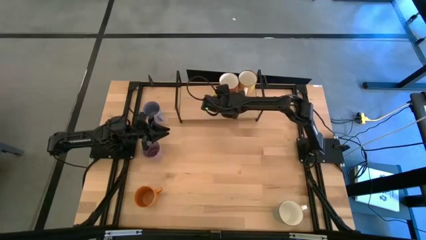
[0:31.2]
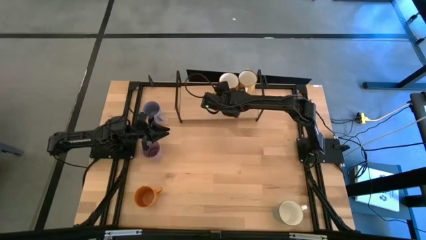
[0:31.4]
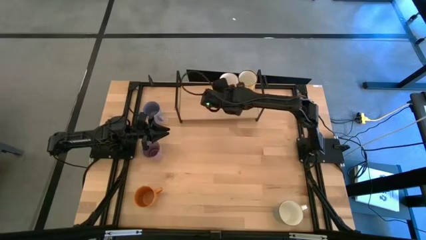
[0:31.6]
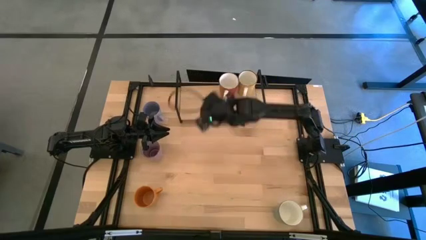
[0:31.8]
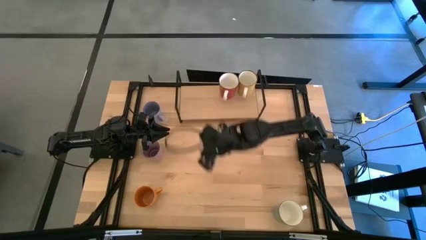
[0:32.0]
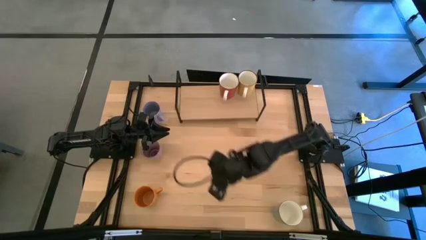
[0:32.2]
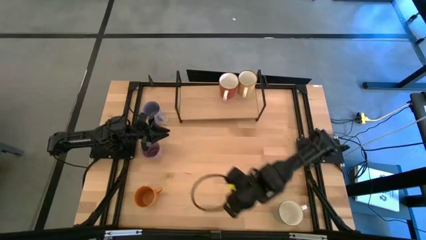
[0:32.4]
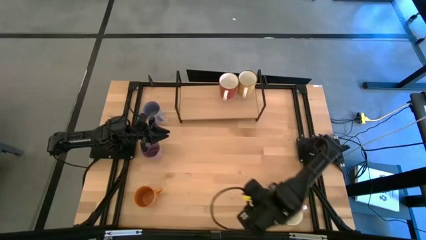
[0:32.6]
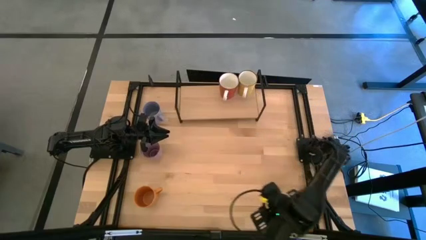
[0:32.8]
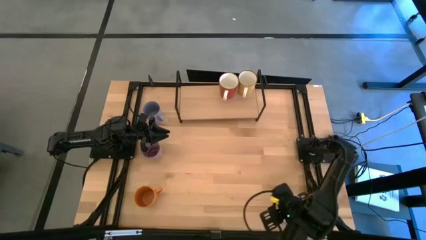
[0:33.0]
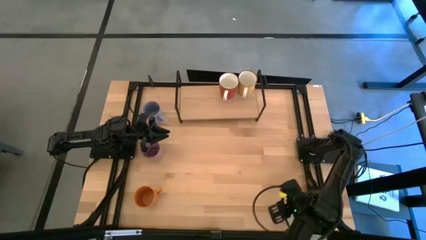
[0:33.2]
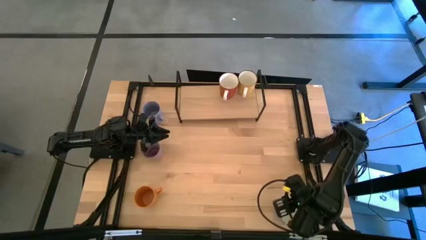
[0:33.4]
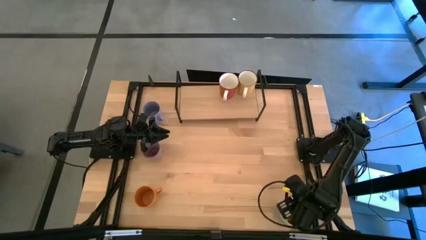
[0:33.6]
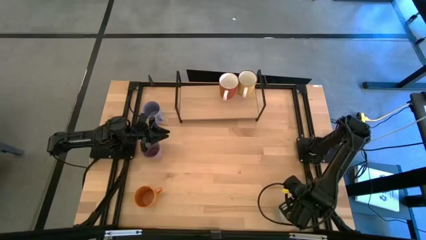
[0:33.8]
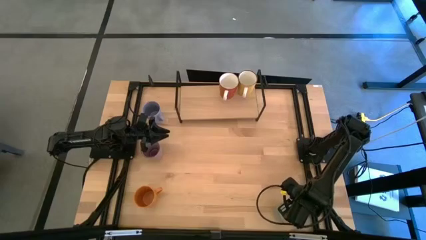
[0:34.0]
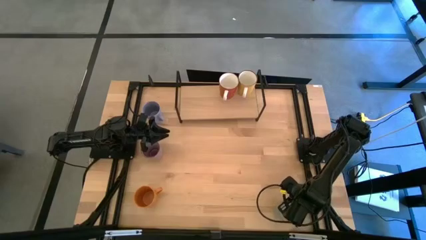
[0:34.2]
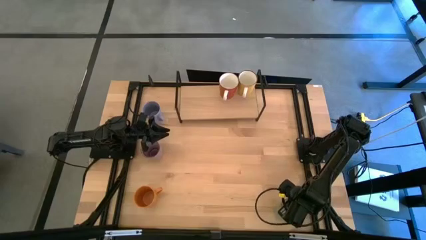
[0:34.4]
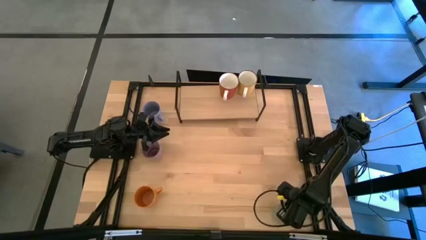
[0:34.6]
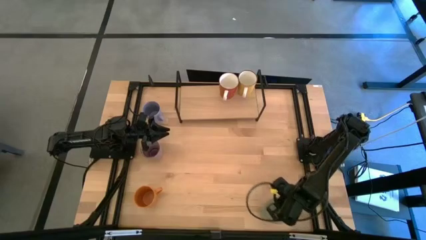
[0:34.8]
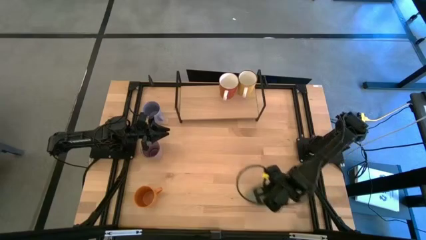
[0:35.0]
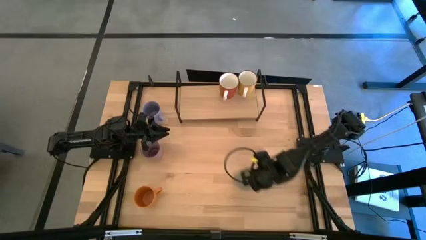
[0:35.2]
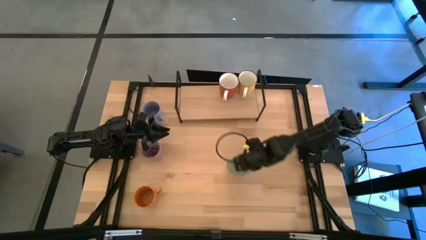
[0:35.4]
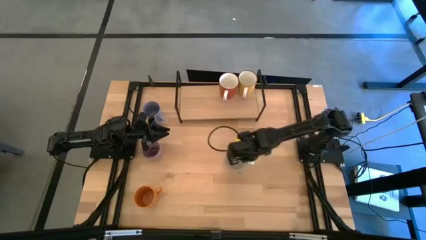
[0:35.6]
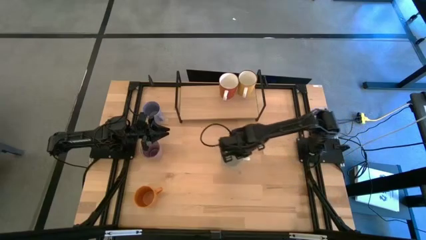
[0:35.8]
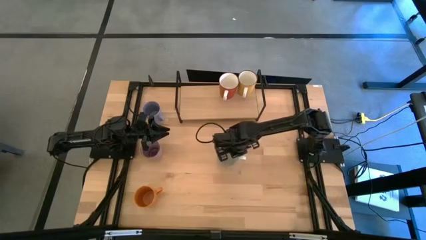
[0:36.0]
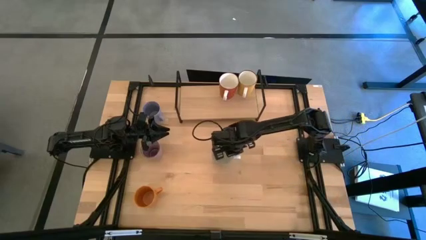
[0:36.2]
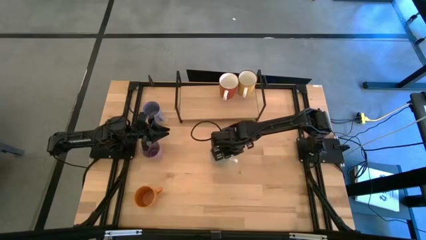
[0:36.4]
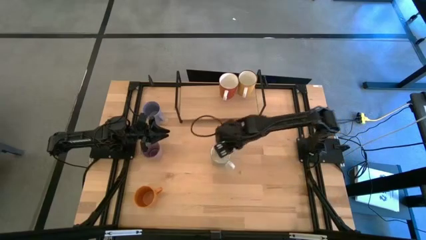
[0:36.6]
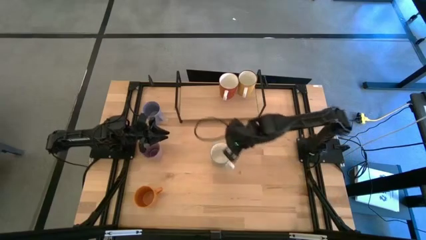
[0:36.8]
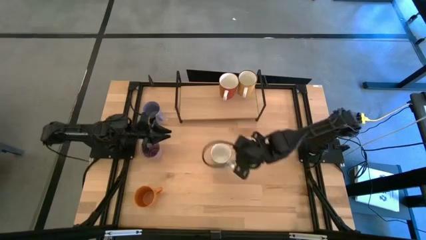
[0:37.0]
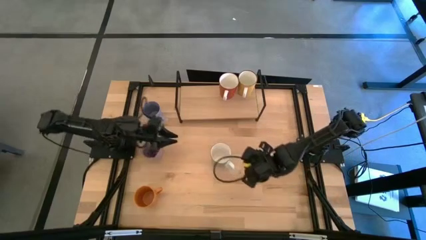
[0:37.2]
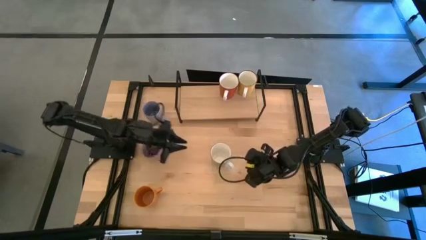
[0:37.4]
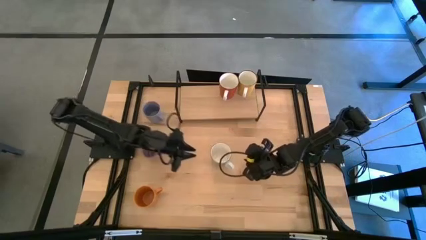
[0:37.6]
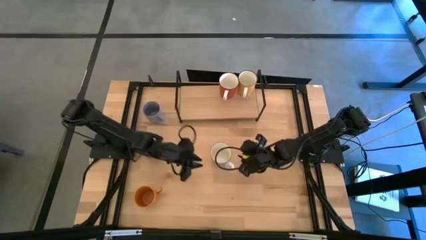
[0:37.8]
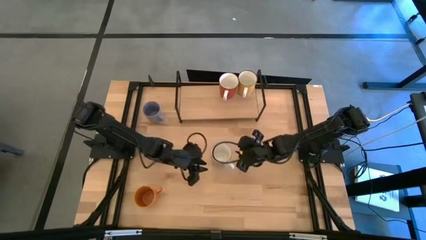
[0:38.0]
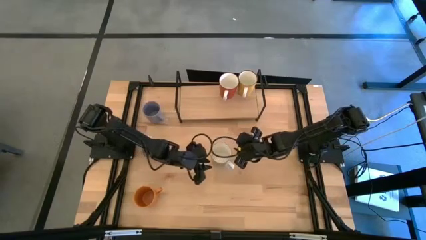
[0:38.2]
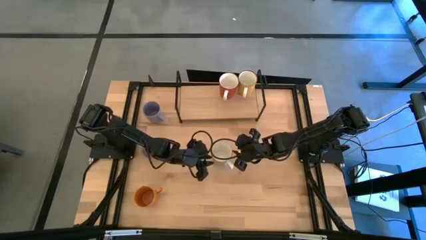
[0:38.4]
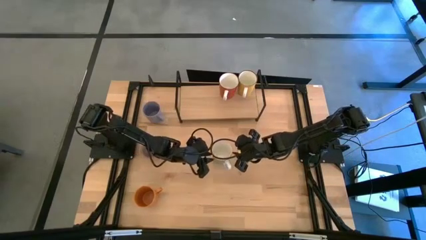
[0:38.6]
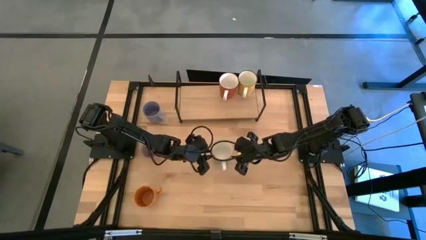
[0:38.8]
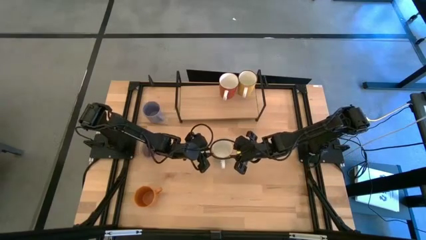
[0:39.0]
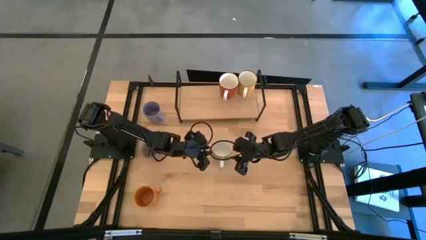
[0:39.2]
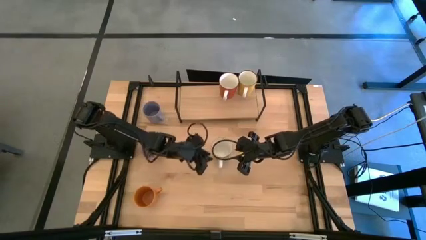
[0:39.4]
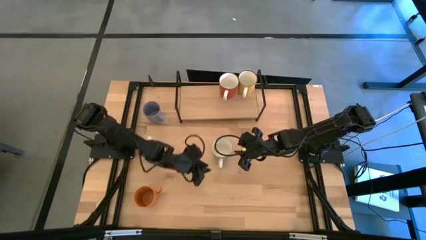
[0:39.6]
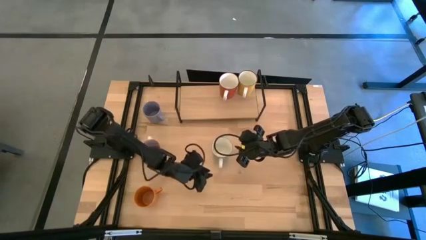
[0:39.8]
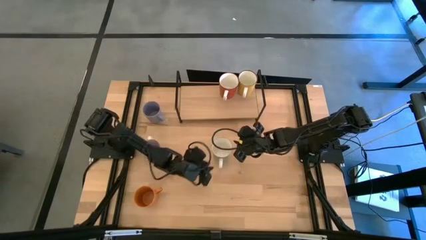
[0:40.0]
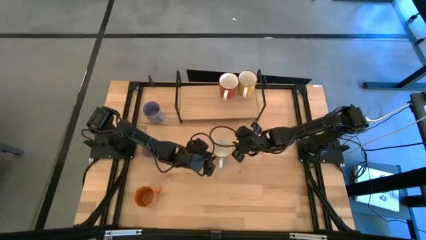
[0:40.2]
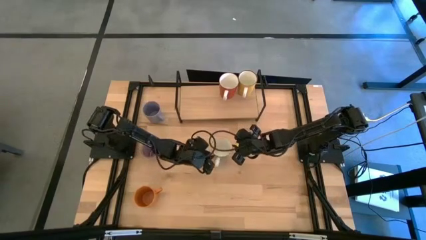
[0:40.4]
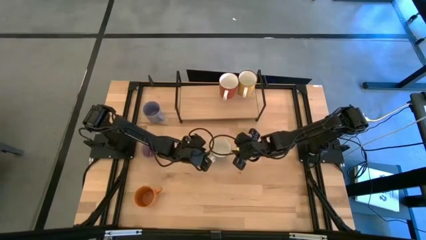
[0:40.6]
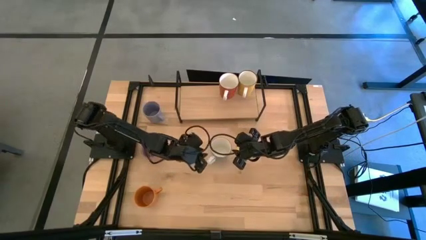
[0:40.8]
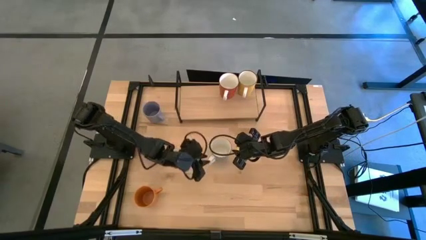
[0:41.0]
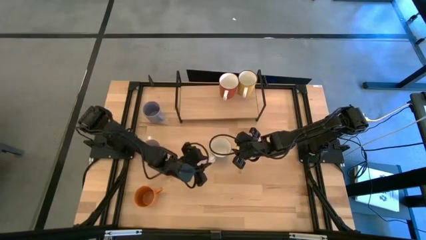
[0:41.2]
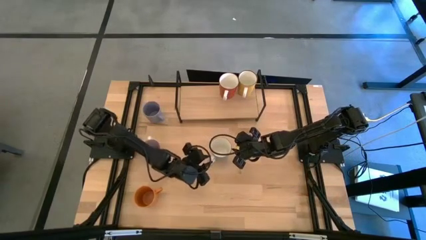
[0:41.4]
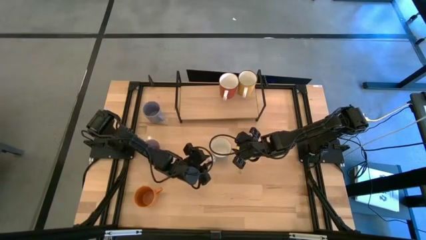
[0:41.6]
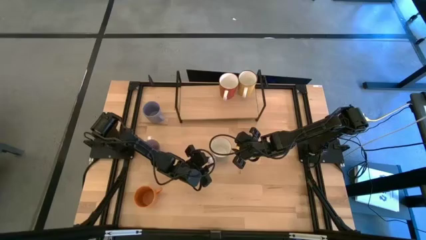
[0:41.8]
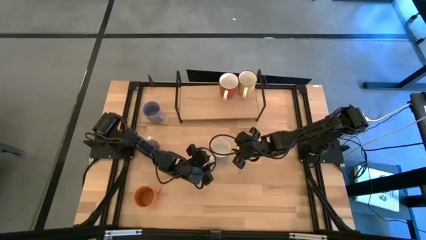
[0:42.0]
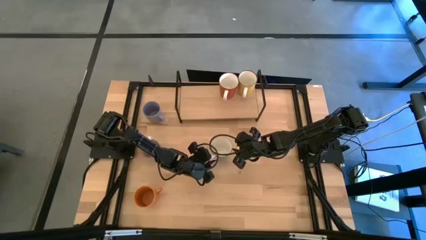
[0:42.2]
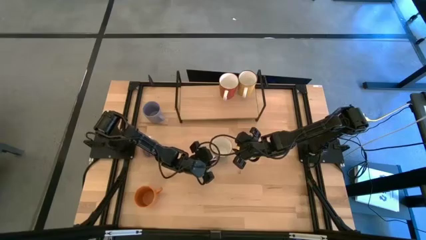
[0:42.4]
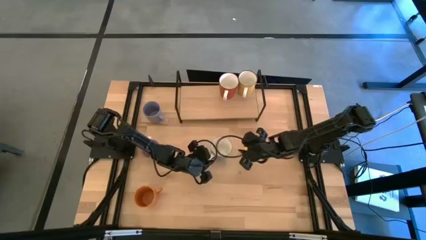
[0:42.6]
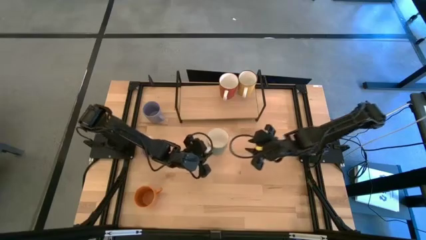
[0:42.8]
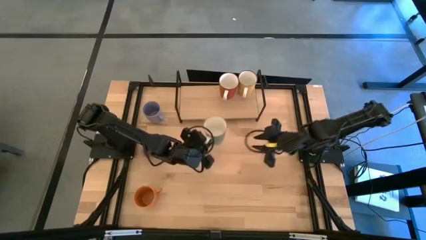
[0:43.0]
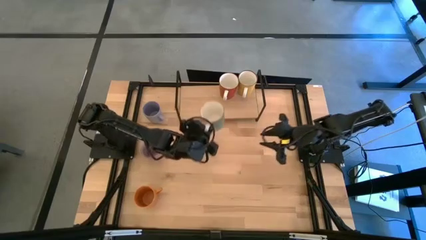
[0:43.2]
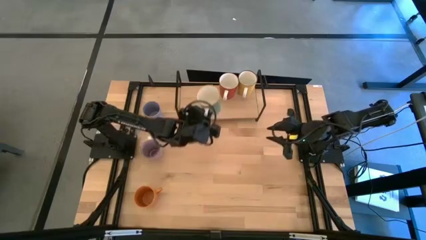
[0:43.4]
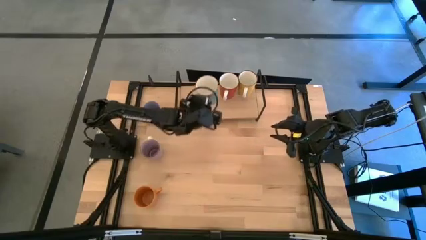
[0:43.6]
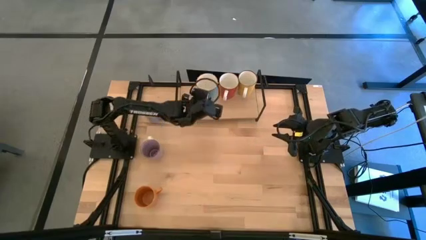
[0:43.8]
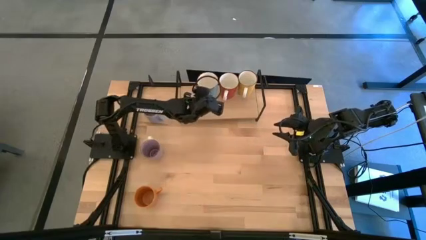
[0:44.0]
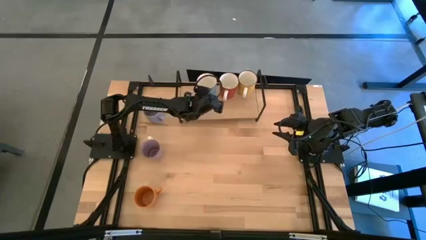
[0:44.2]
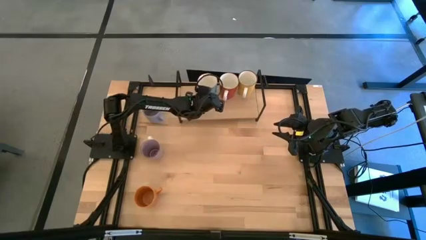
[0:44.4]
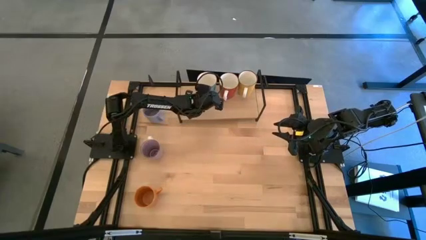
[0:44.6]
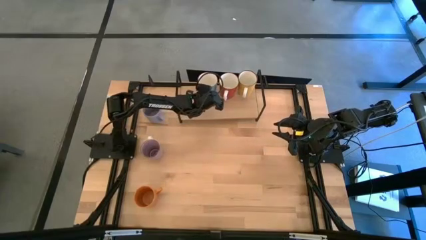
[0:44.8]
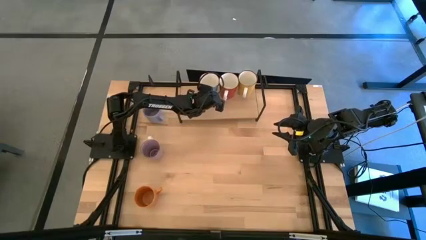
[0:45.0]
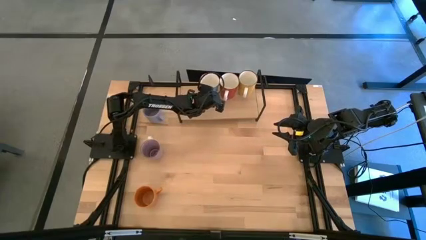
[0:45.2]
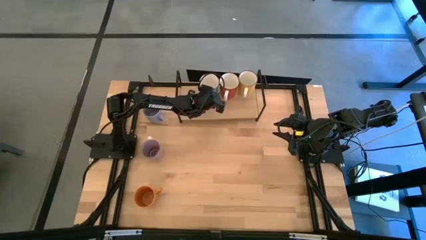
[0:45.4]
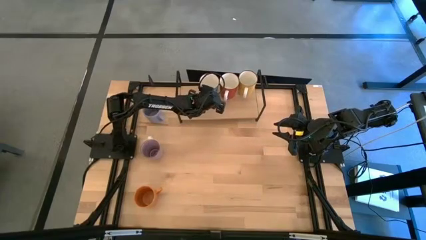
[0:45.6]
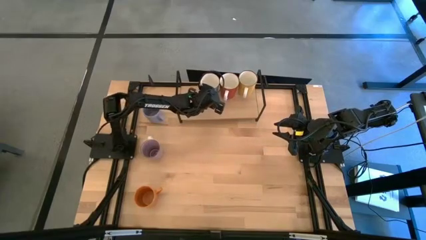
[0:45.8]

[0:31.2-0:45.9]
Task: Place coffee mugs
Put the light blue mug on the shelf
